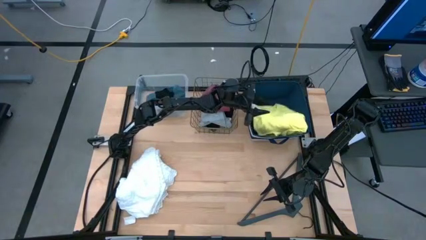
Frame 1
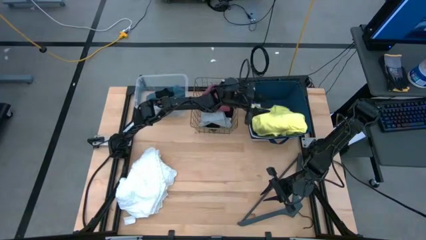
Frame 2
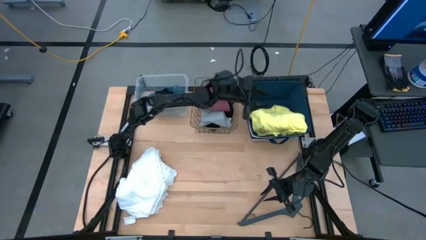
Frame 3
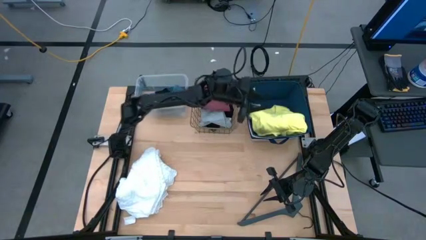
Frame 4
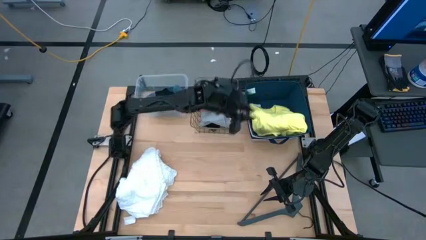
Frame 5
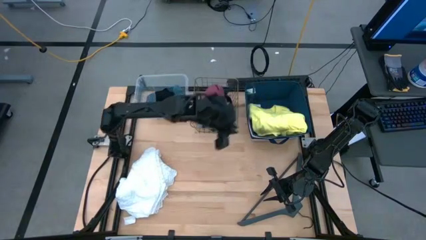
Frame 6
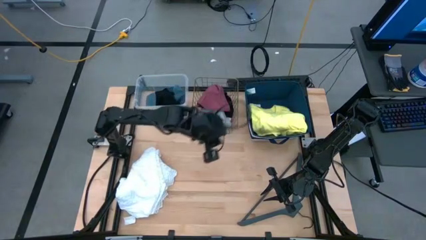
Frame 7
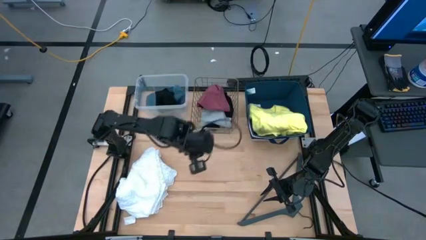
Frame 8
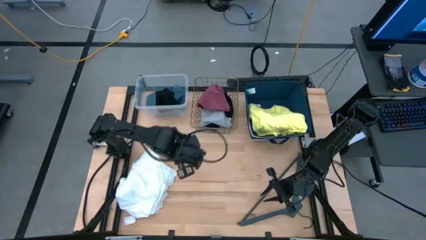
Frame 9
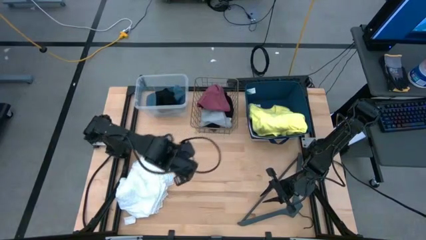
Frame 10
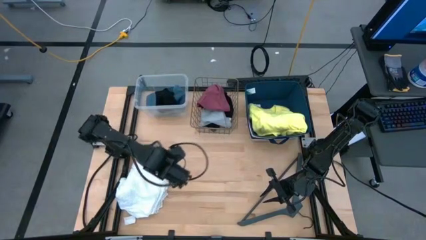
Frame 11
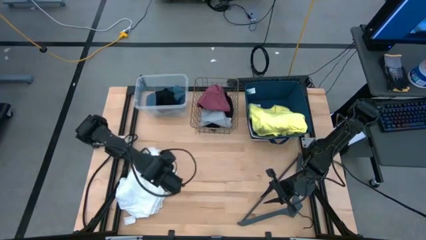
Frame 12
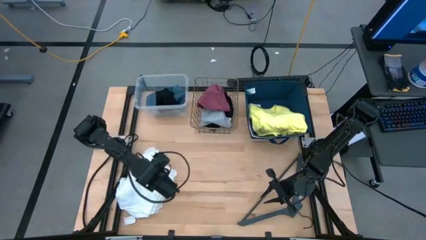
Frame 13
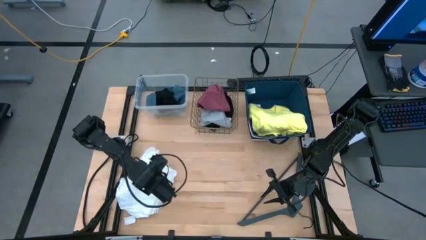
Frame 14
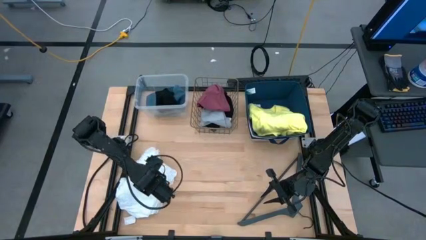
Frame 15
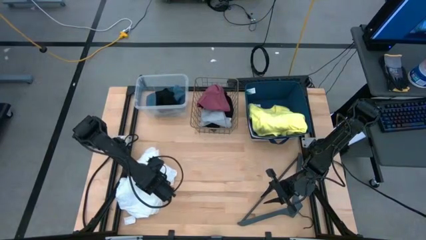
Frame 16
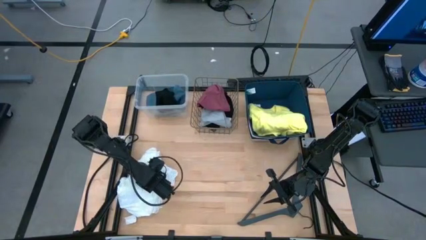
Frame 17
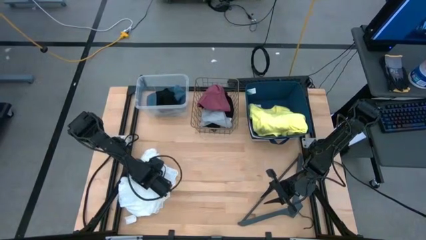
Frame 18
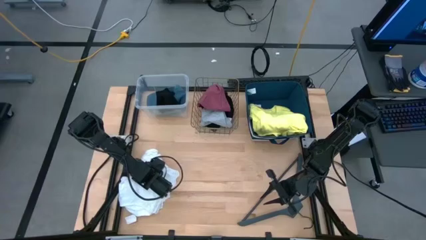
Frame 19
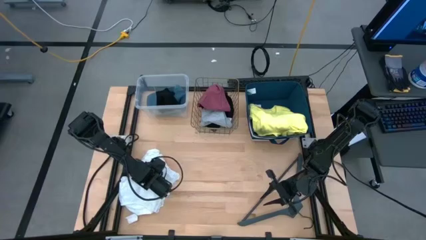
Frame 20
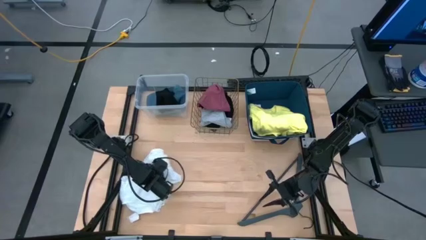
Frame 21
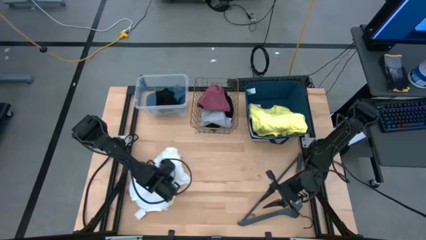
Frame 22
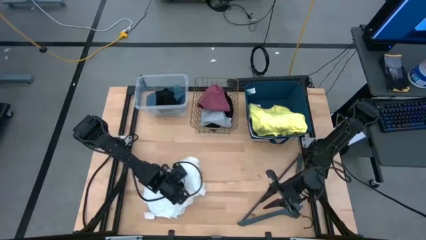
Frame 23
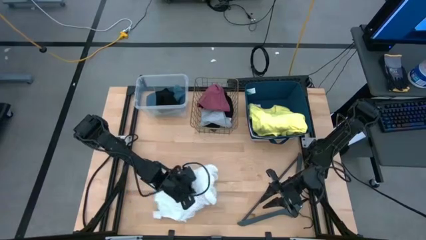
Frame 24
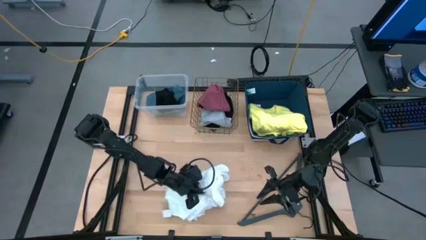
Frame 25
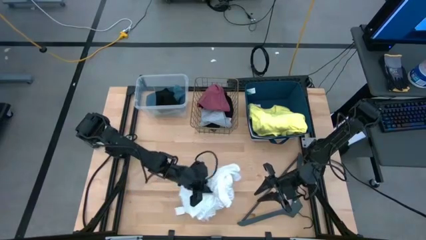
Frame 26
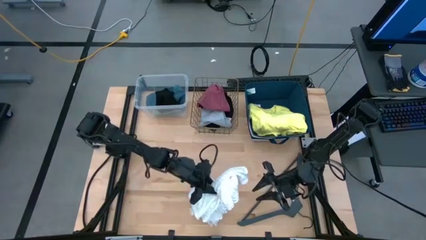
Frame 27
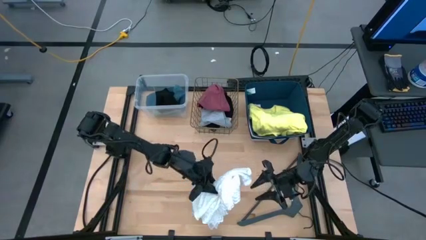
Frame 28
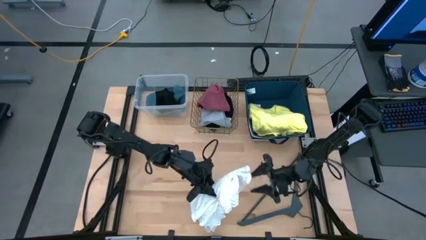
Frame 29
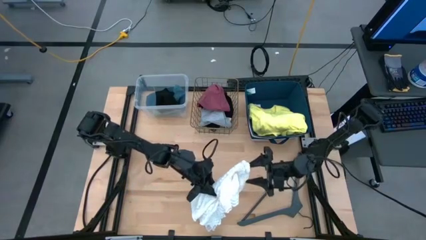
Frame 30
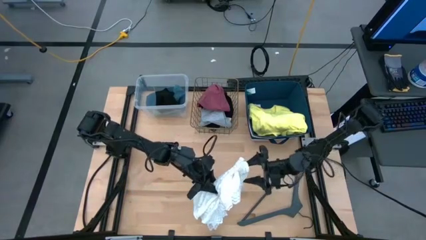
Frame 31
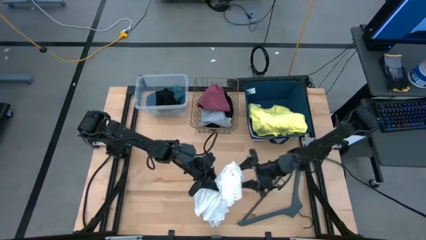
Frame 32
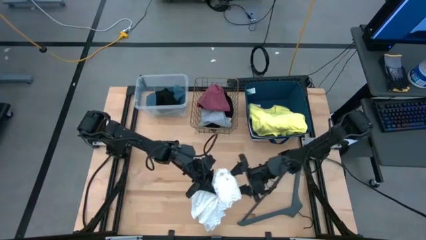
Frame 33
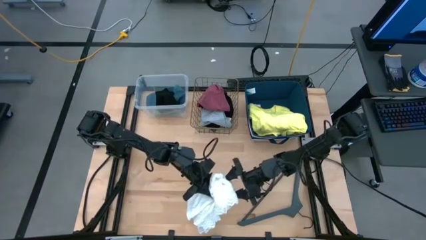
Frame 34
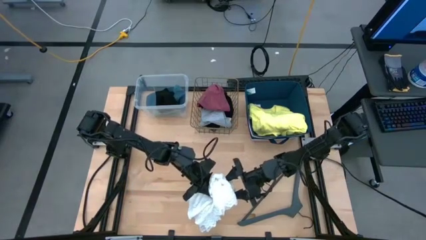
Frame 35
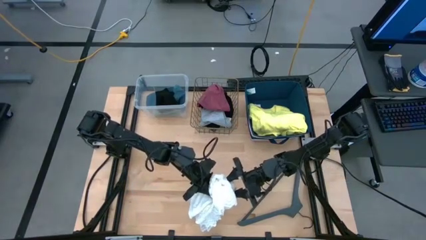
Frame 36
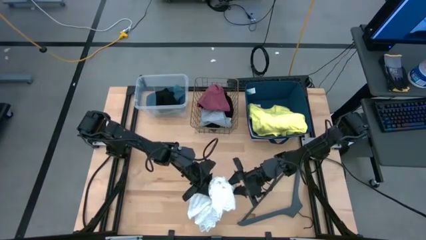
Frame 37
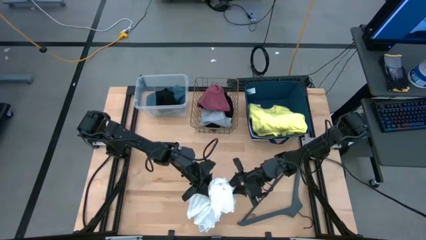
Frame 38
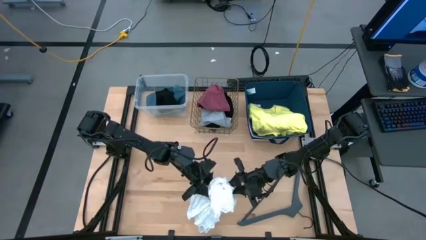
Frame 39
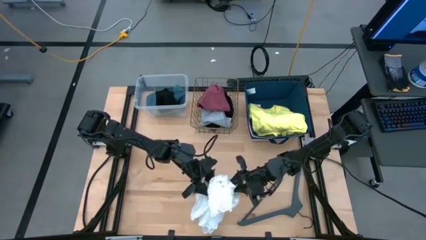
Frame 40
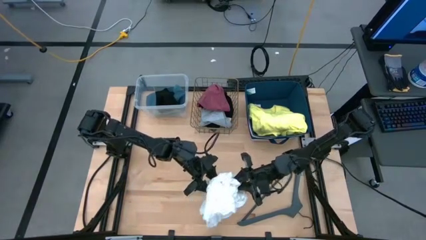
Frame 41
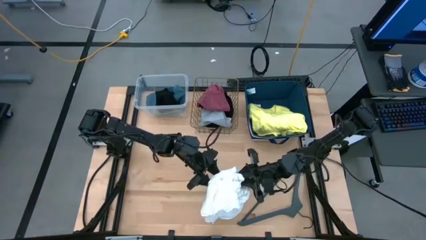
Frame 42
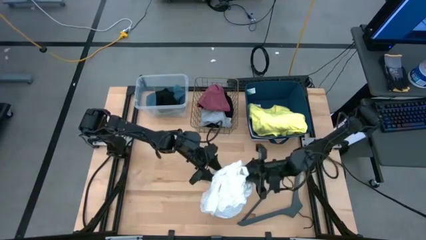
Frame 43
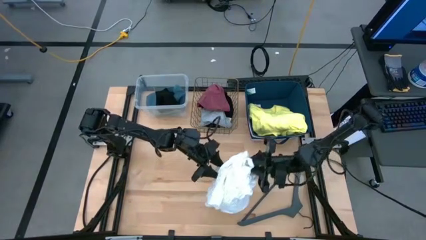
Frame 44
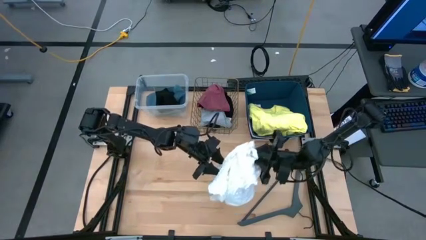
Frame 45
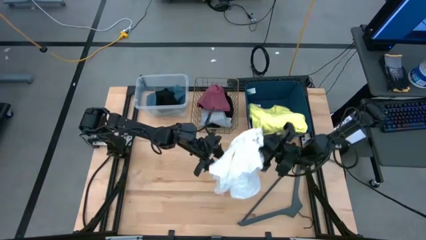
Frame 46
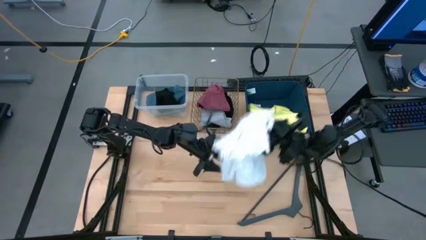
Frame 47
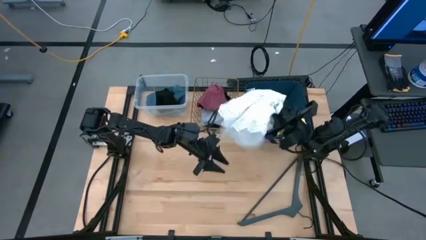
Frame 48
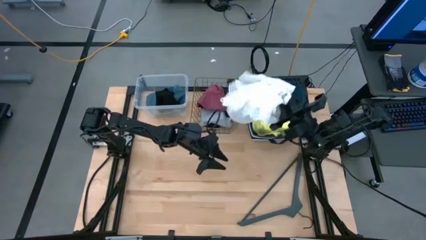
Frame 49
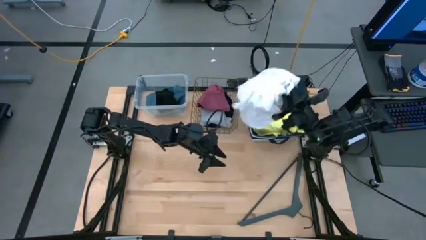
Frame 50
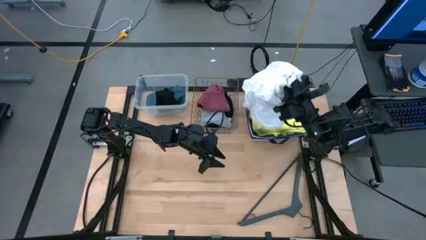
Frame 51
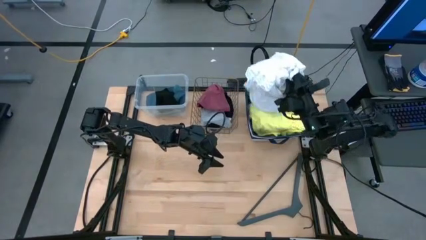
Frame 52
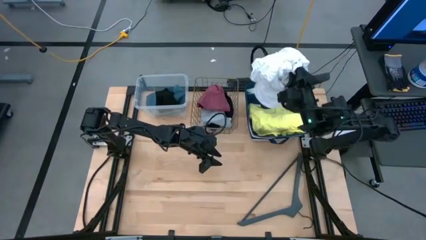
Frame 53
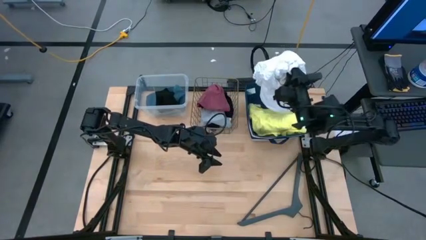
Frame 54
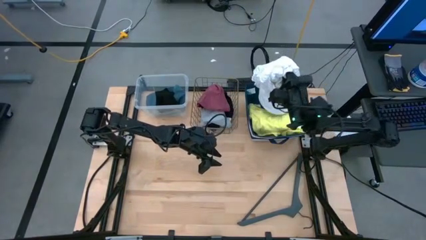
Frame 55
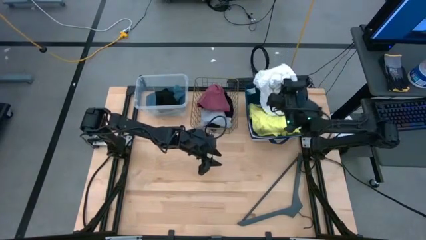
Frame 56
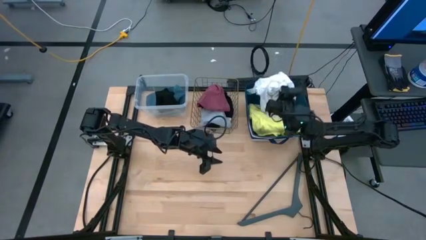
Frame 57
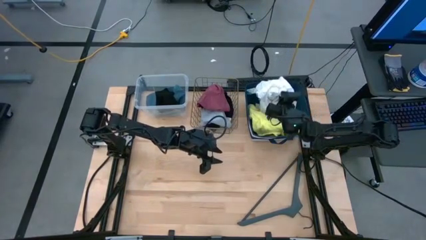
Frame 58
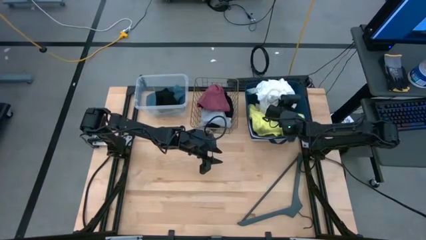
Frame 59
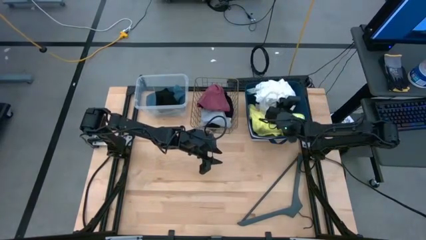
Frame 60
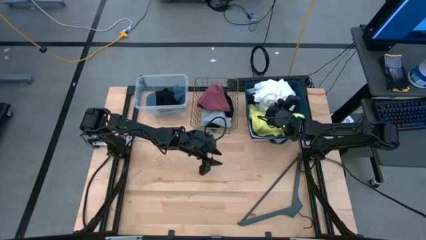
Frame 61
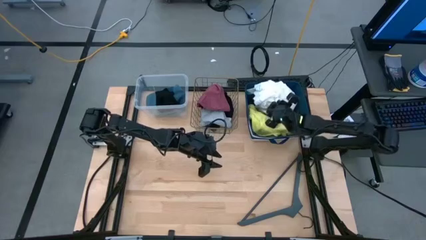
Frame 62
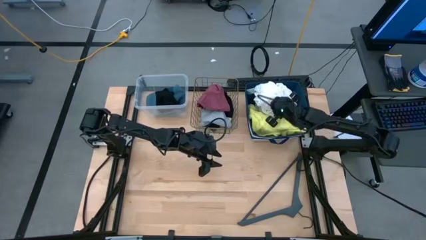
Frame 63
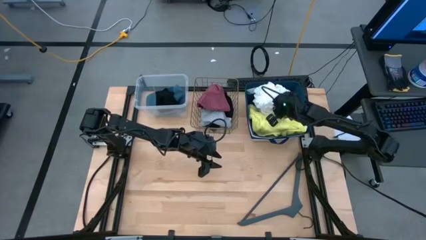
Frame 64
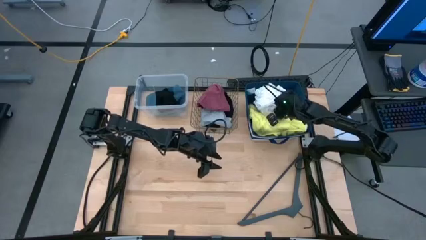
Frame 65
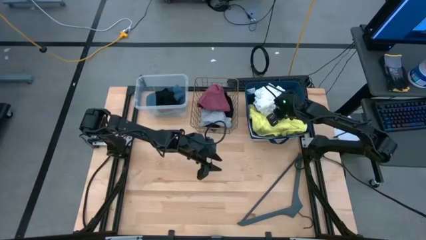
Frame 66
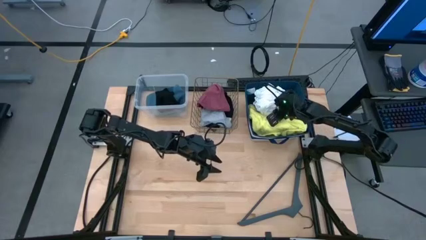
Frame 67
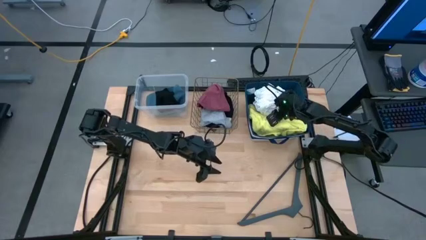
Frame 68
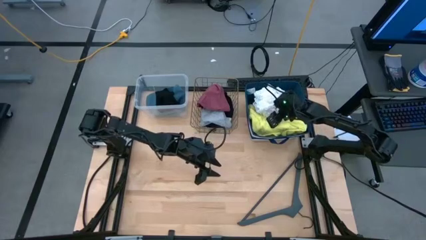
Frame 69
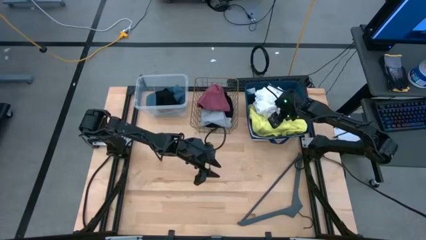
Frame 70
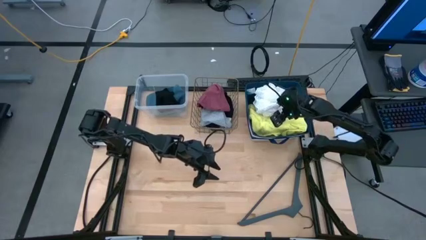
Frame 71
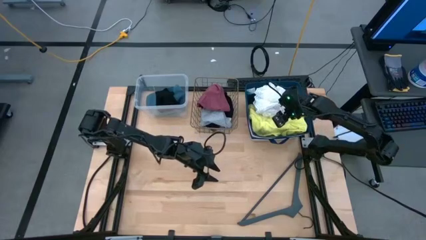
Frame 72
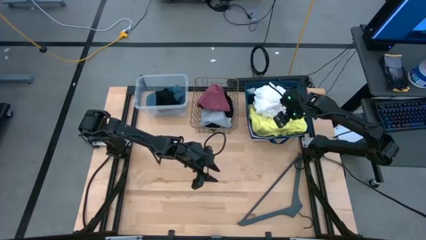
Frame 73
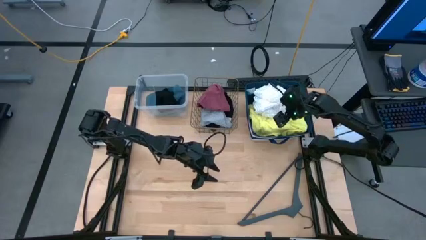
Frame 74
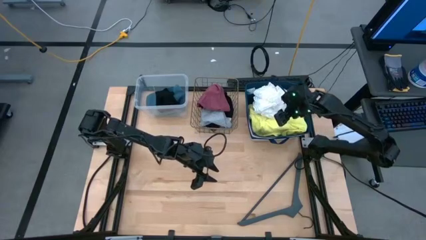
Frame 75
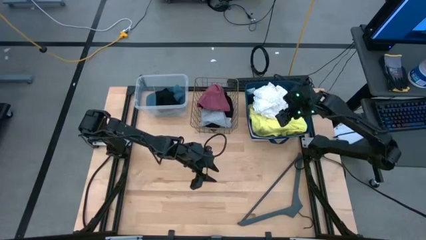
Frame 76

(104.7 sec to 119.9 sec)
Task: Pick & Place Cloths
Put the white dress into the blue laundry organizer

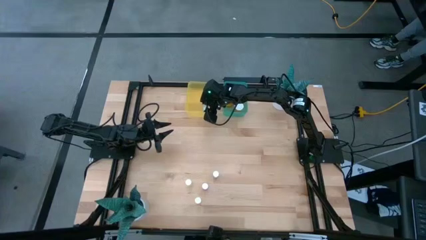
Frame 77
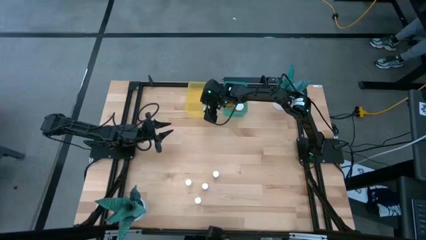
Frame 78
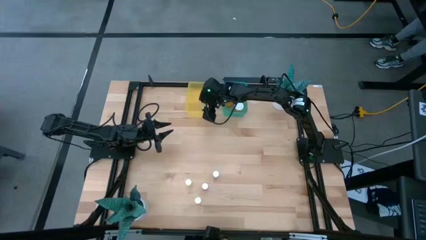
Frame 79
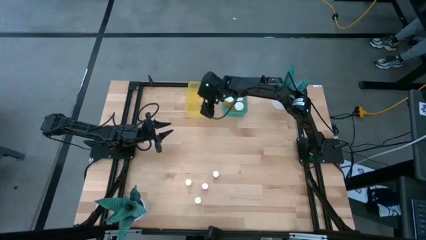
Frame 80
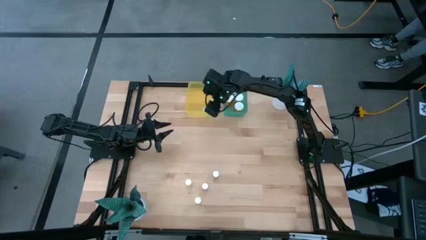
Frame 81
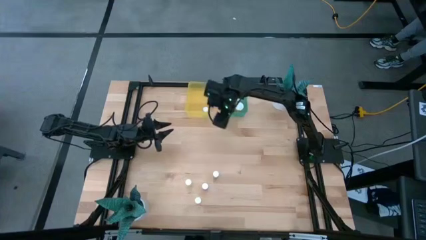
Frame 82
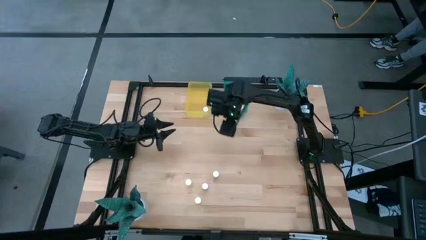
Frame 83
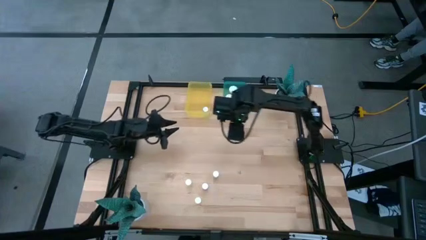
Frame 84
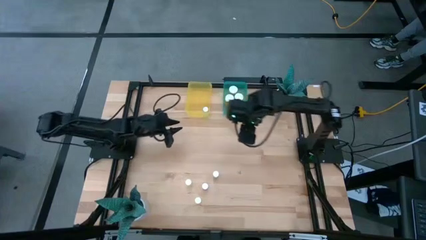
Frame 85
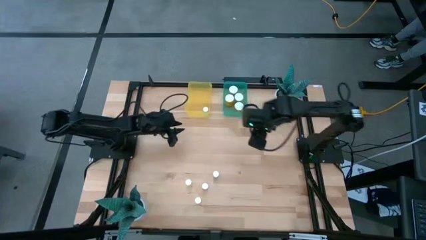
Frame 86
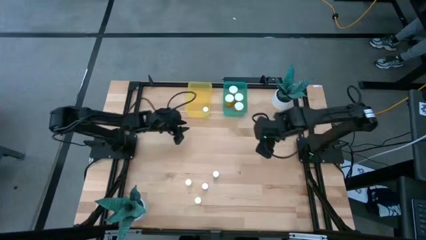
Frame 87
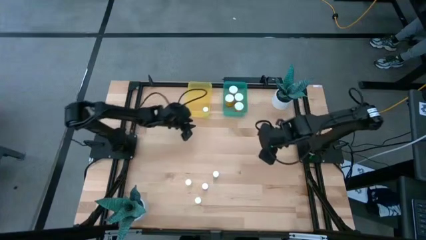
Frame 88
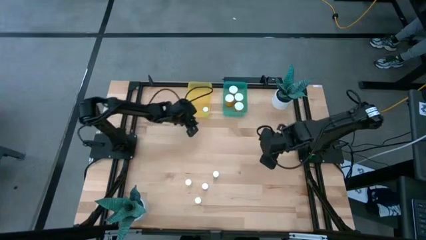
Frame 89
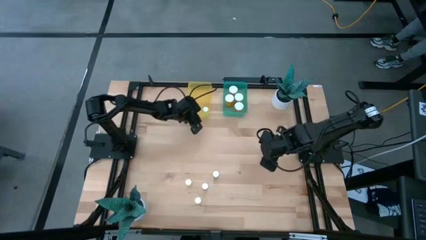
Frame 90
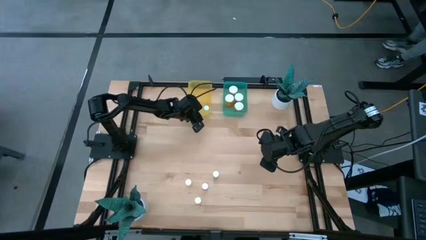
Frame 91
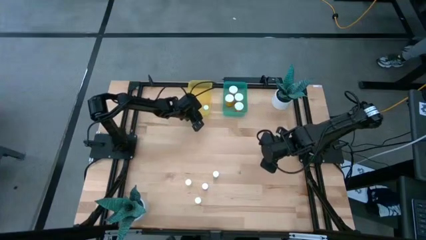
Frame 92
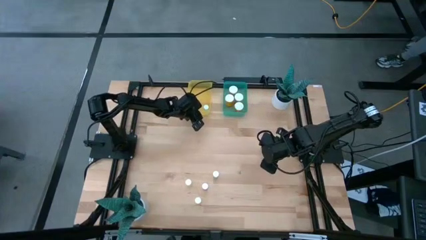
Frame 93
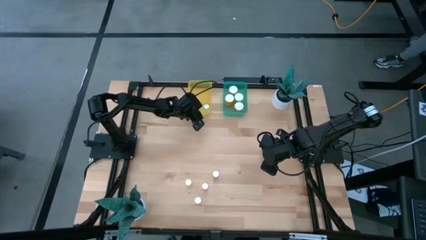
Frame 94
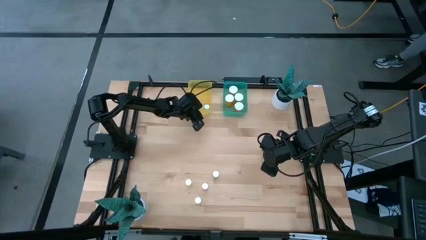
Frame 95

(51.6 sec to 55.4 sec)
Task: Pick and place medicine bottles into bin by pill shape (circle, oval)
Adjust the yellow bin
